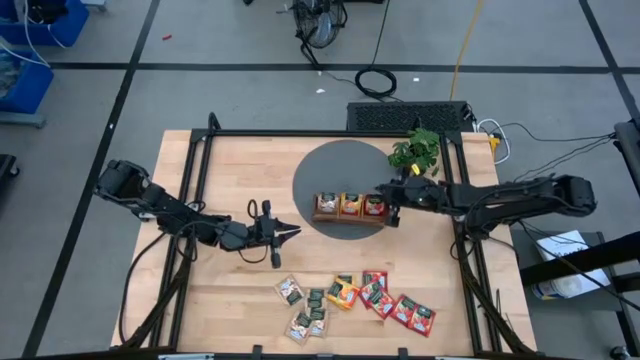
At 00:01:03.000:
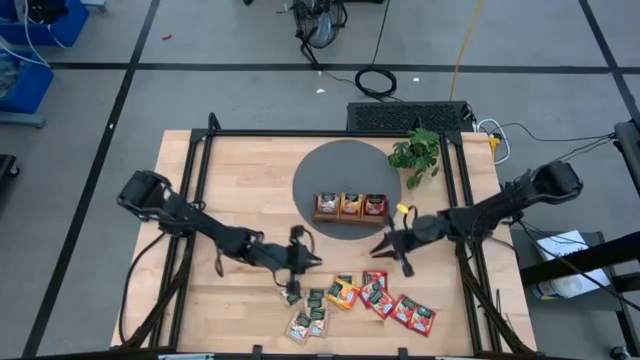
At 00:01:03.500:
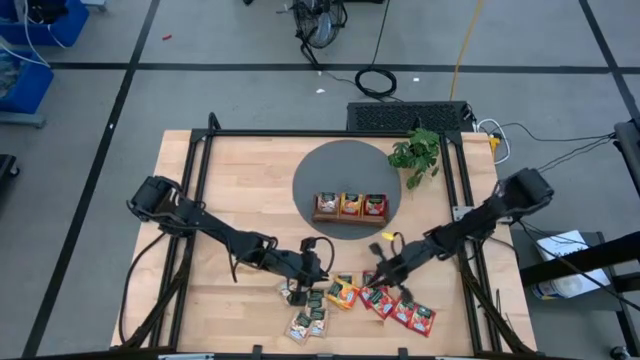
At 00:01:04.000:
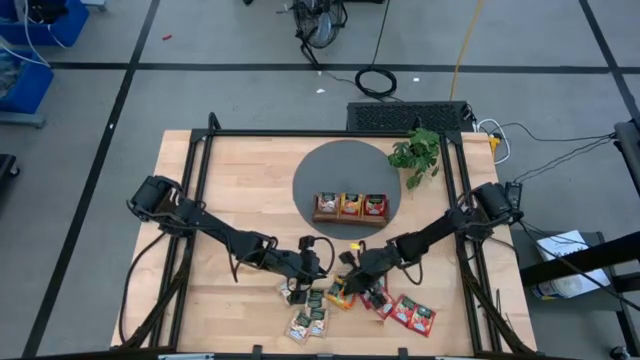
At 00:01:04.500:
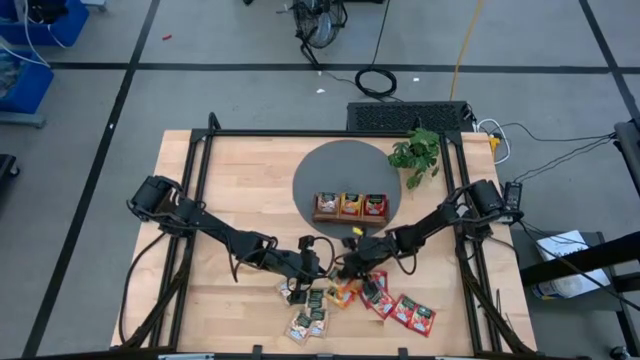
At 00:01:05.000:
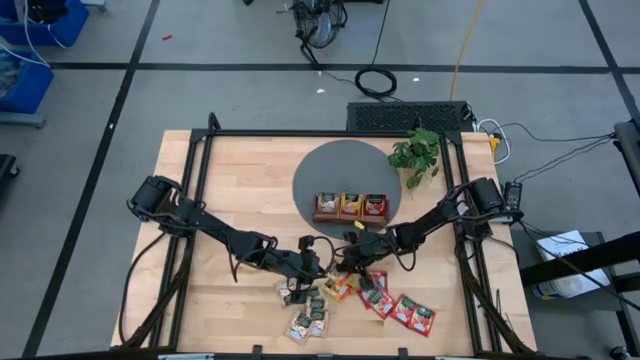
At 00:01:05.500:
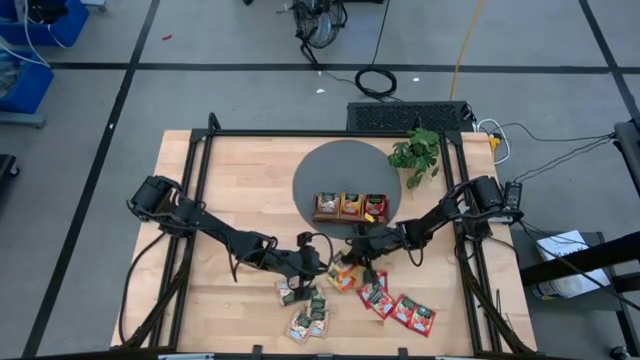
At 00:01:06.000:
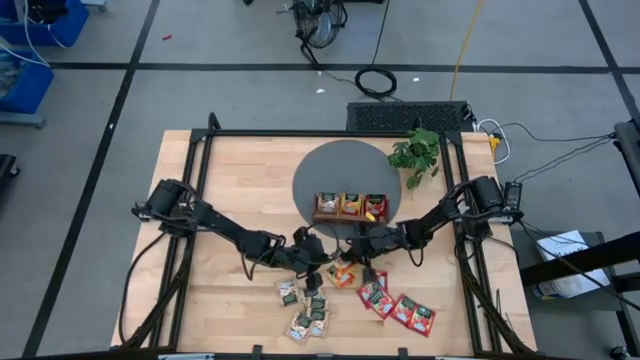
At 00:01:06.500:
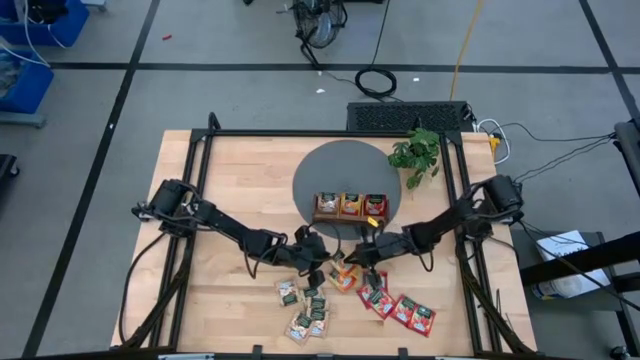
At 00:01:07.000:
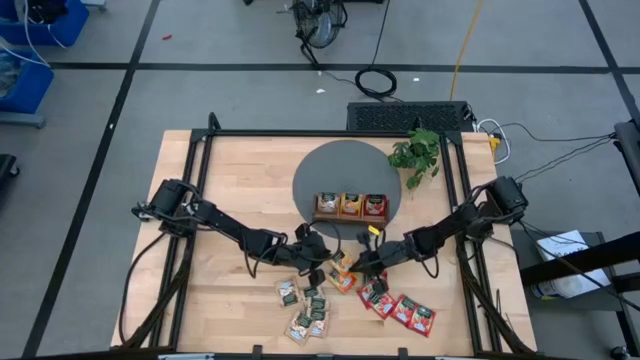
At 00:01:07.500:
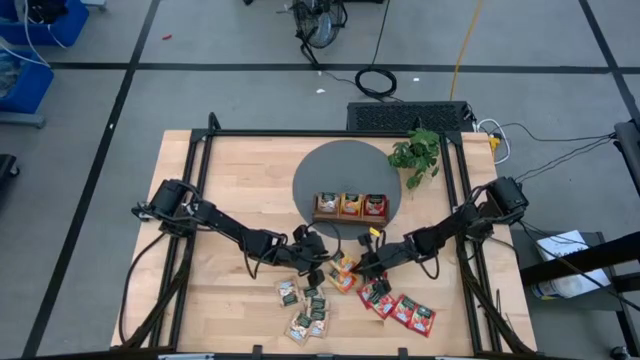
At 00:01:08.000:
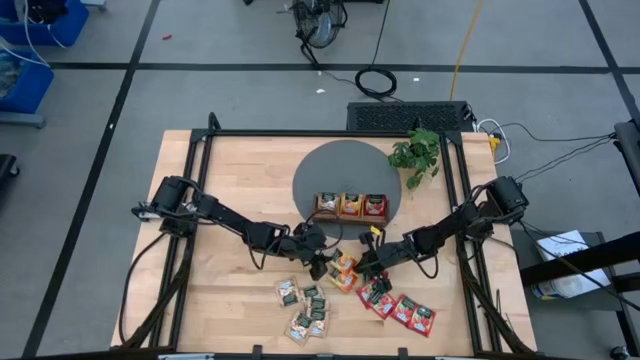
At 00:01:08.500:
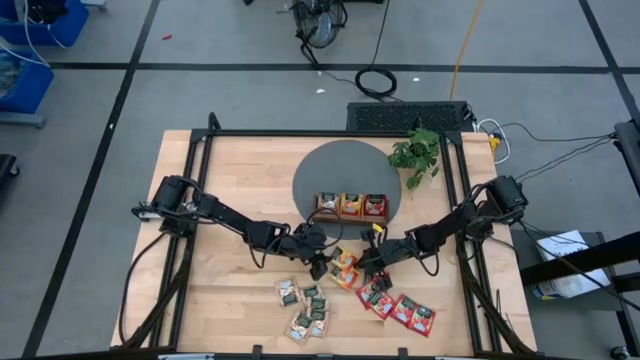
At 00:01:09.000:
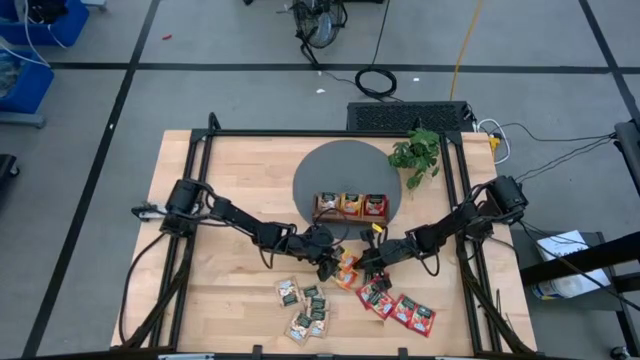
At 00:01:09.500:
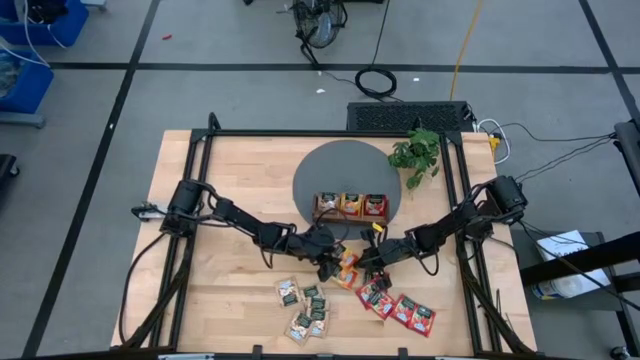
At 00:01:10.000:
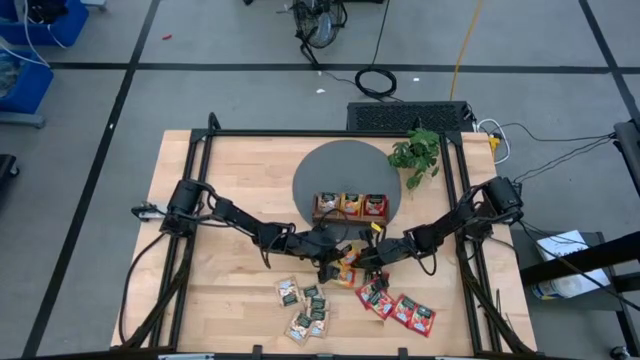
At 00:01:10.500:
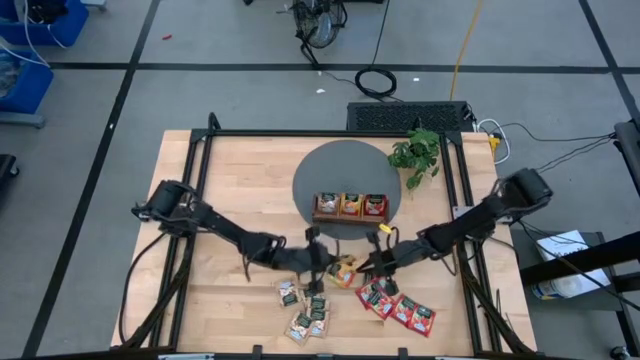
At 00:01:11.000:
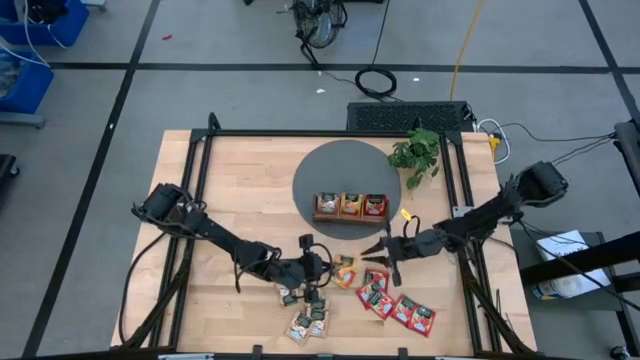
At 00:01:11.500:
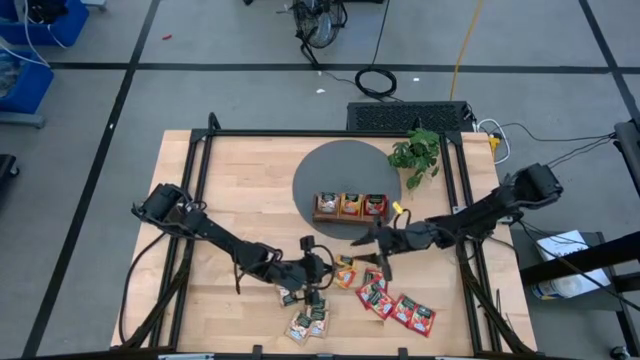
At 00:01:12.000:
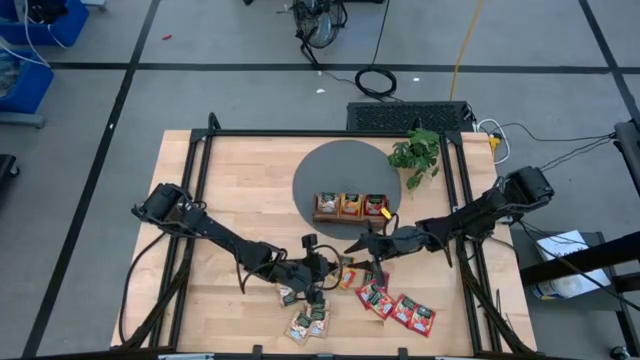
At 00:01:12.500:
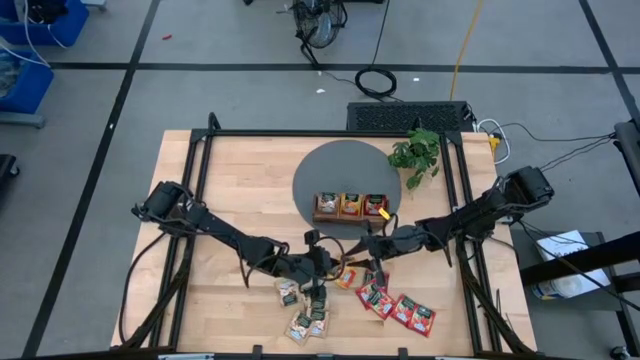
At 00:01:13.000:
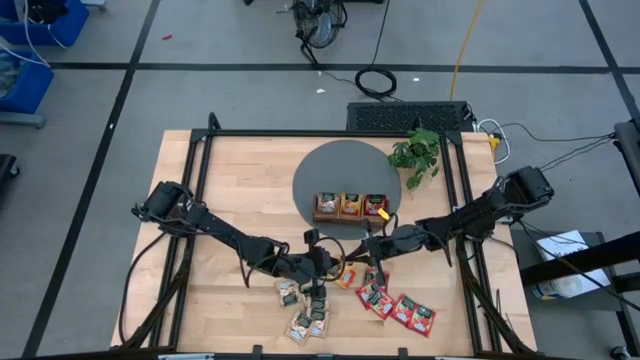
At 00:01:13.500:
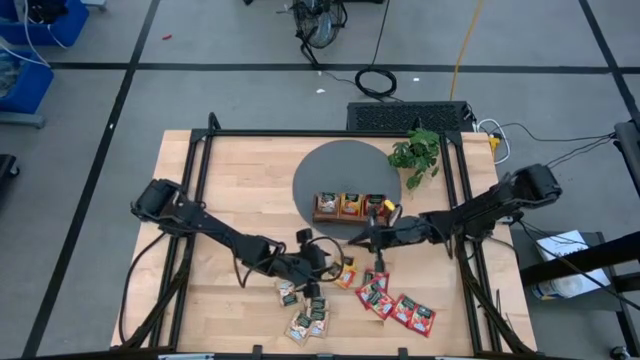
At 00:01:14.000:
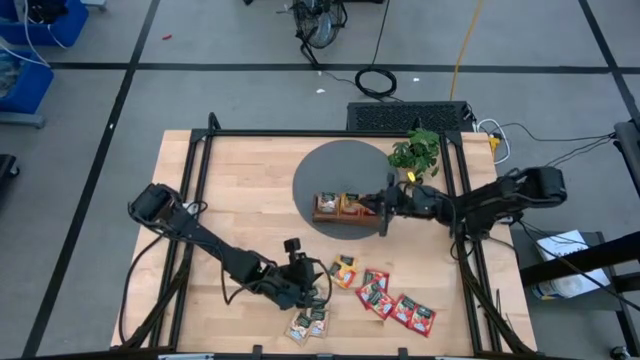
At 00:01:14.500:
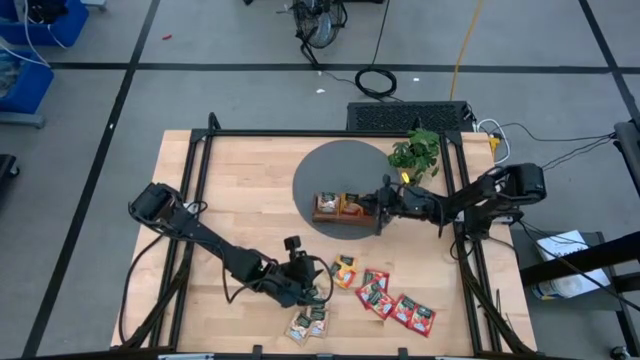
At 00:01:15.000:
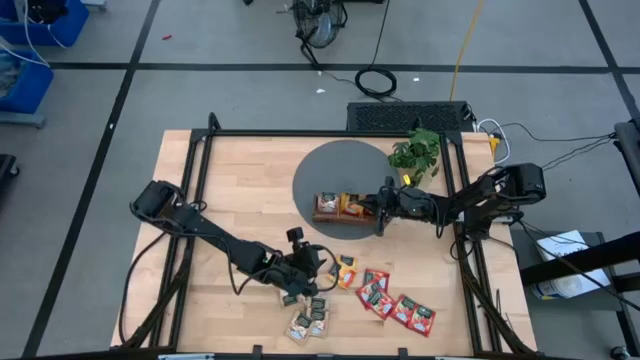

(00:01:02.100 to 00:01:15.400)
Task: Pick & Place Tea
Put the yellow tea bag into the middle section of the wooden organiser

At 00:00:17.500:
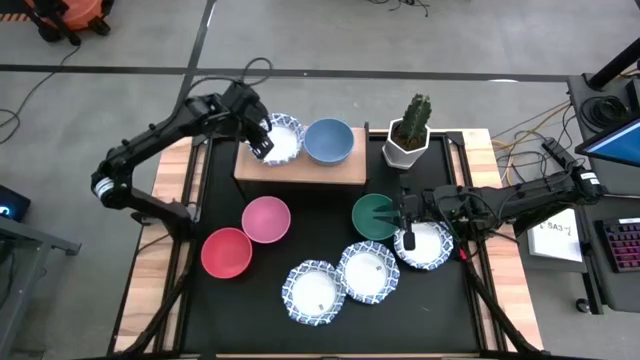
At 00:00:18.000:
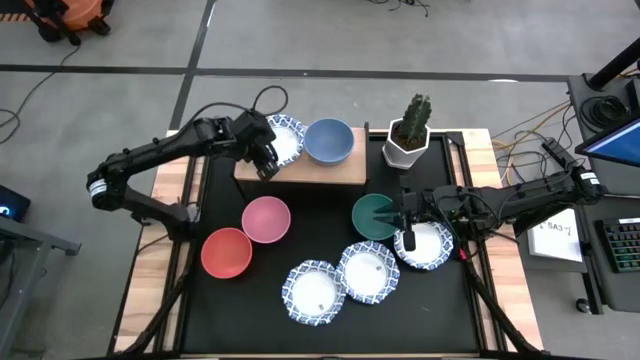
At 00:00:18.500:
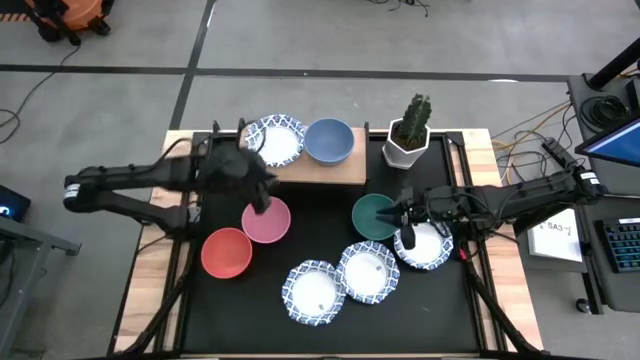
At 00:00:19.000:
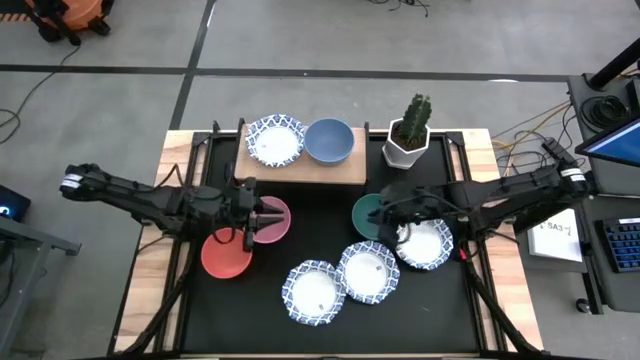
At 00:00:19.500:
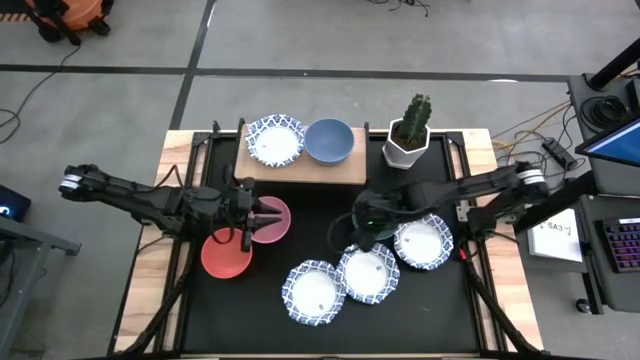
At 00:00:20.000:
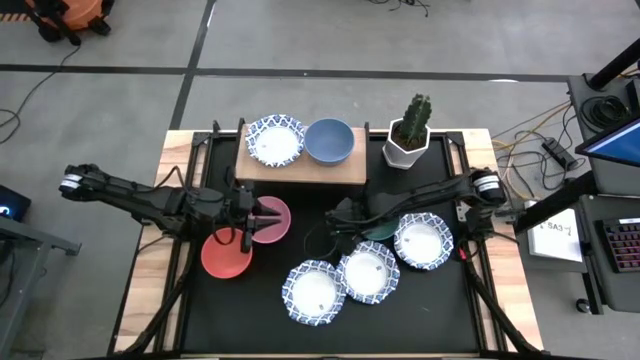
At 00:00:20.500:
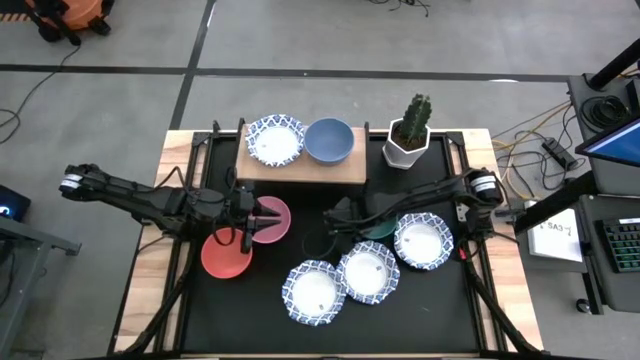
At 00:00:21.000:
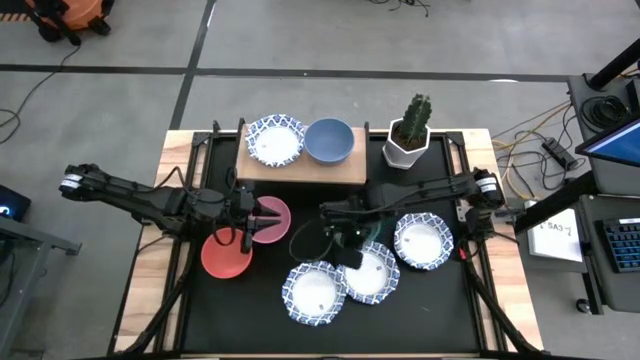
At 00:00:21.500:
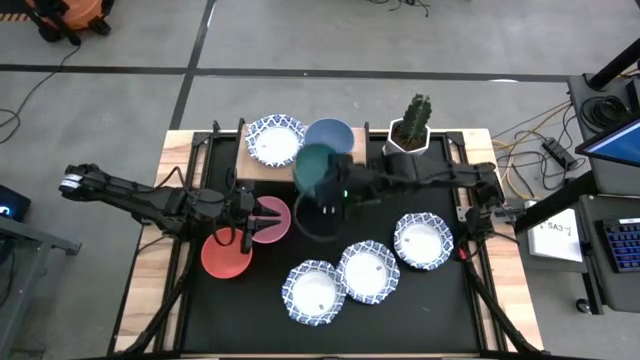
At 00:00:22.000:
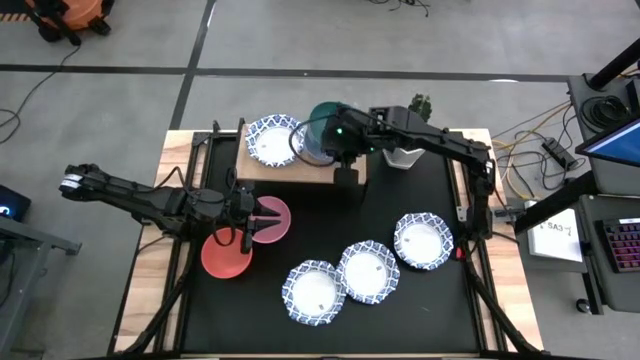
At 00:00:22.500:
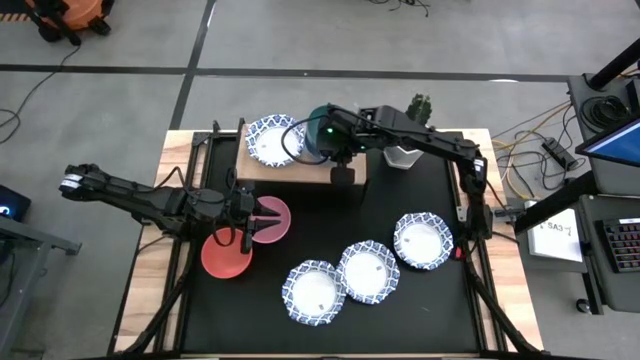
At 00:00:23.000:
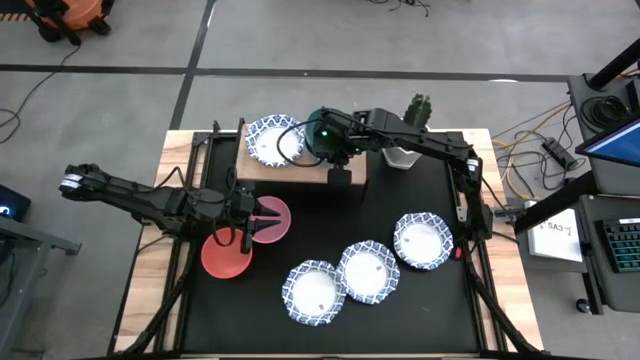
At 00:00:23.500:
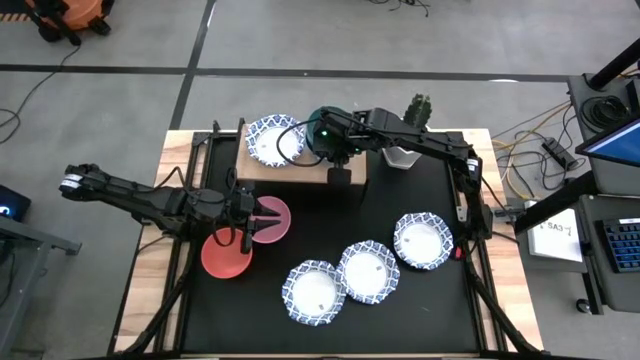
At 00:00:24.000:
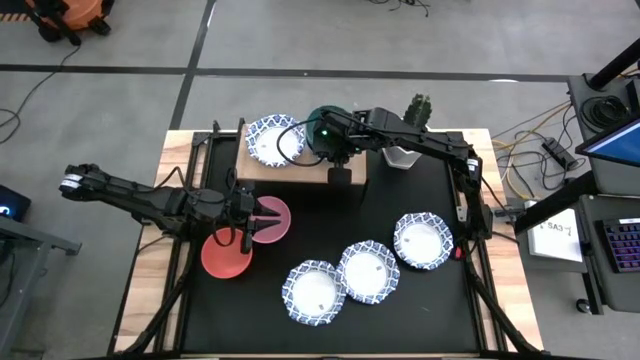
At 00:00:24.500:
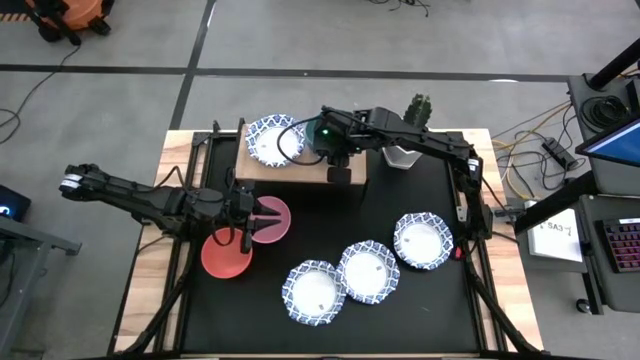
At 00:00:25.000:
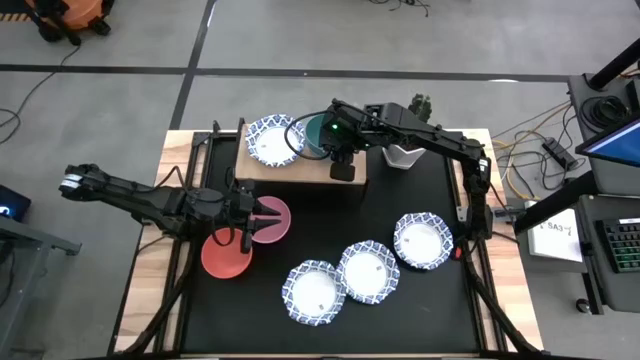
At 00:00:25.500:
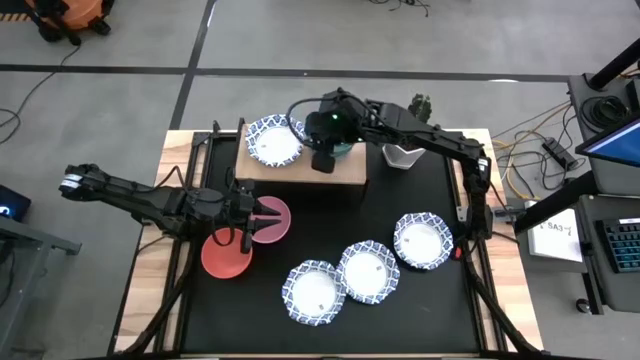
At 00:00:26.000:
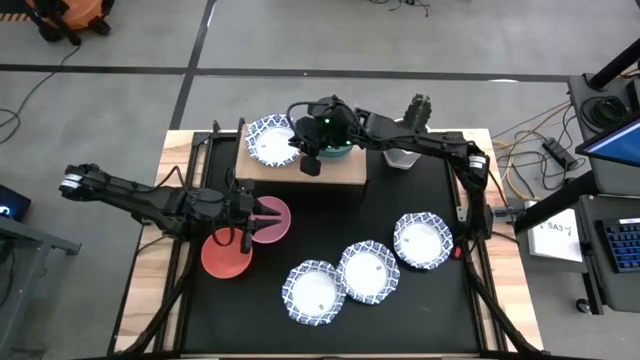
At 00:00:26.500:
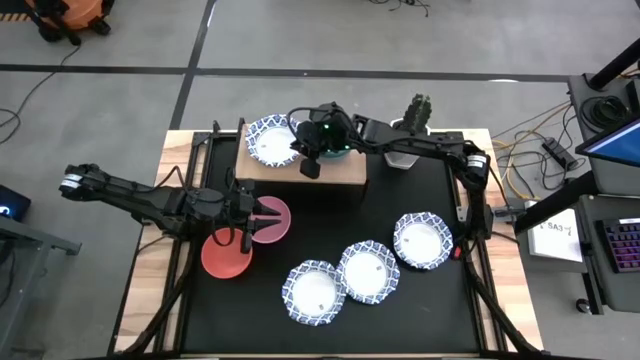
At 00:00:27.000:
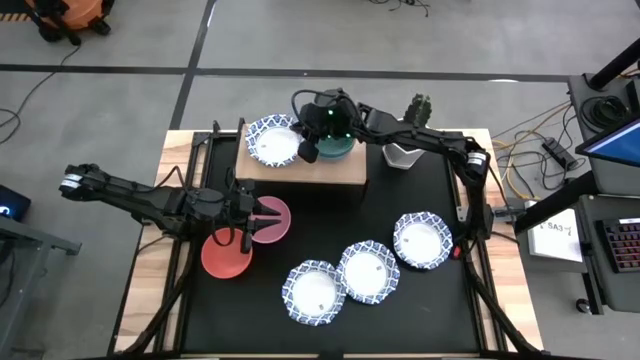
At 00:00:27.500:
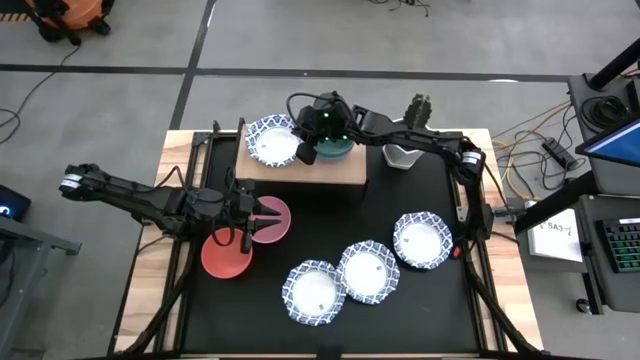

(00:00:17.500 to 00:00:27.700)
Task: Place and stack bowls onto a shelf
Stack the green bowl on top of the blue bowl on the shelf
